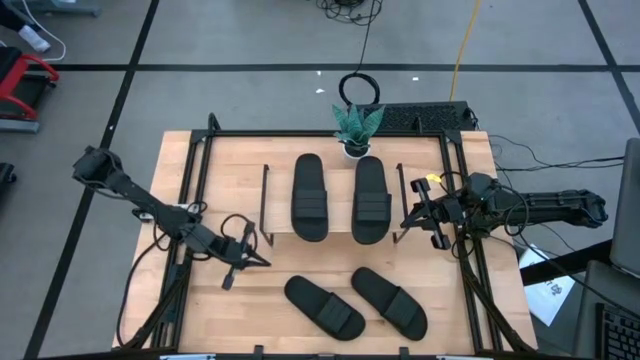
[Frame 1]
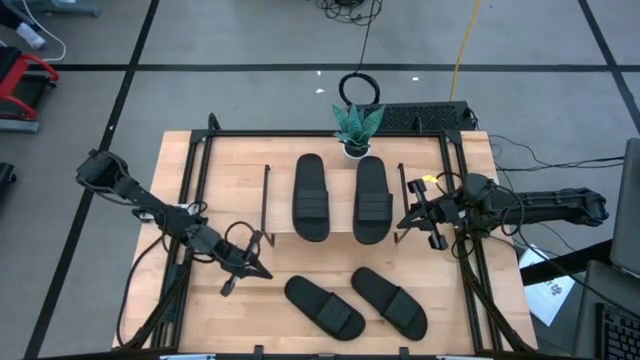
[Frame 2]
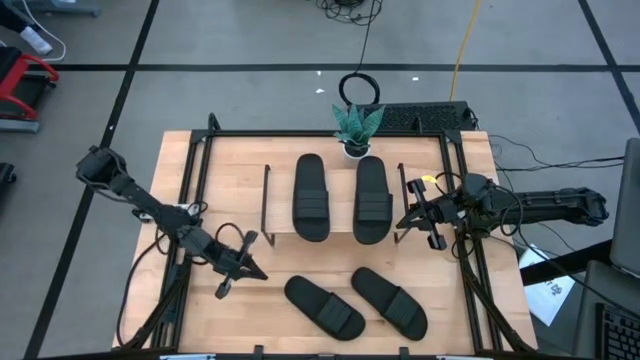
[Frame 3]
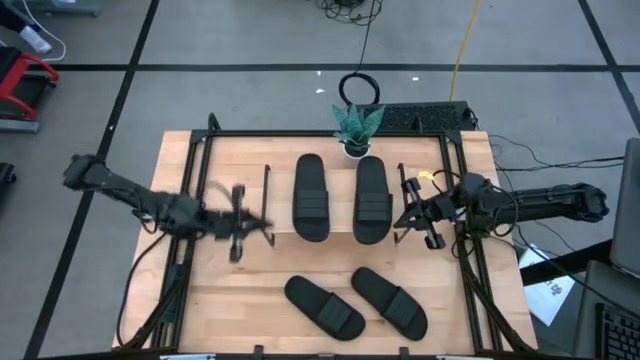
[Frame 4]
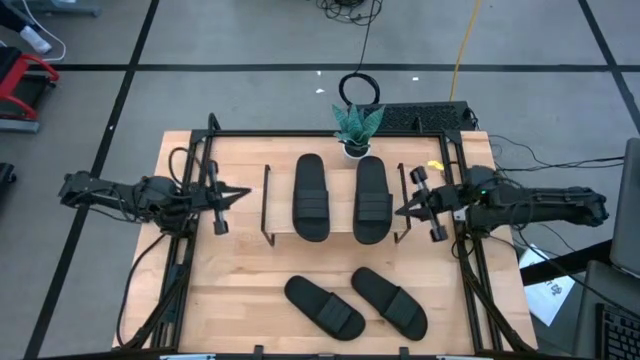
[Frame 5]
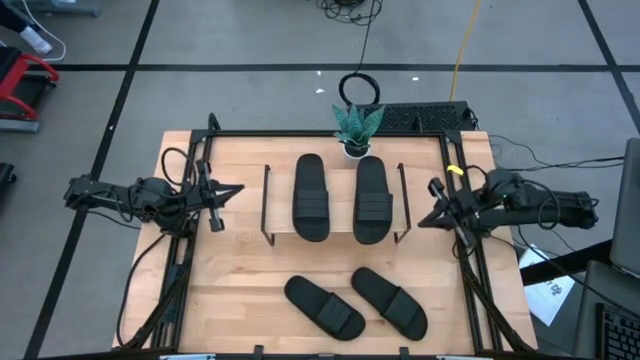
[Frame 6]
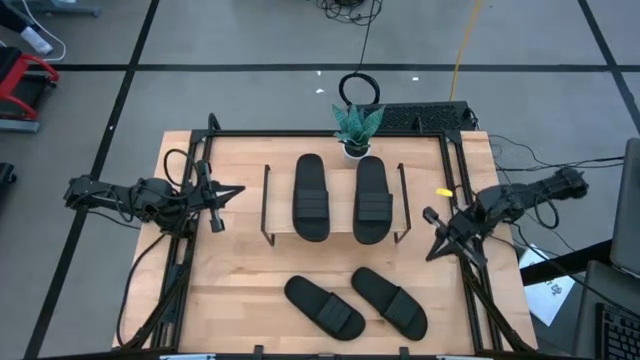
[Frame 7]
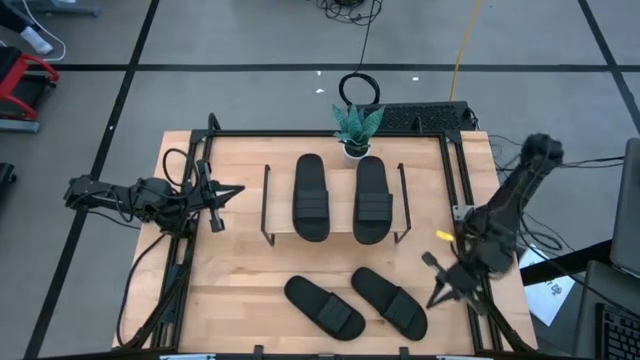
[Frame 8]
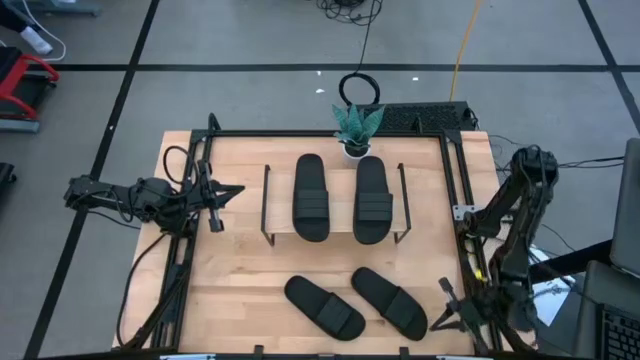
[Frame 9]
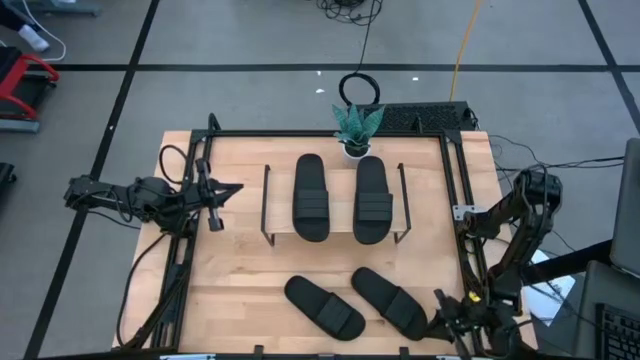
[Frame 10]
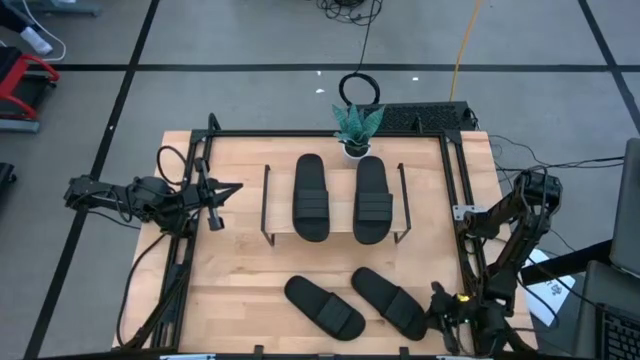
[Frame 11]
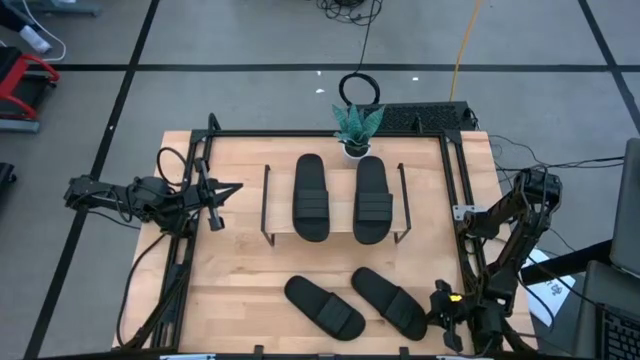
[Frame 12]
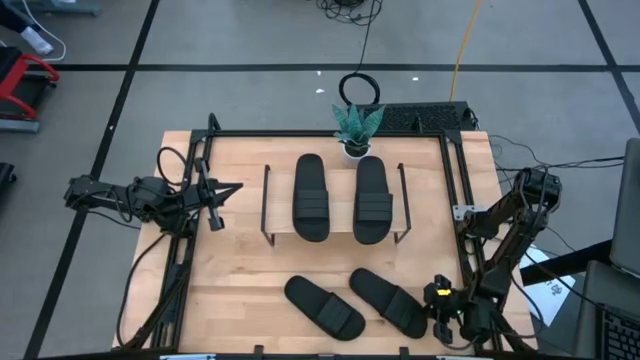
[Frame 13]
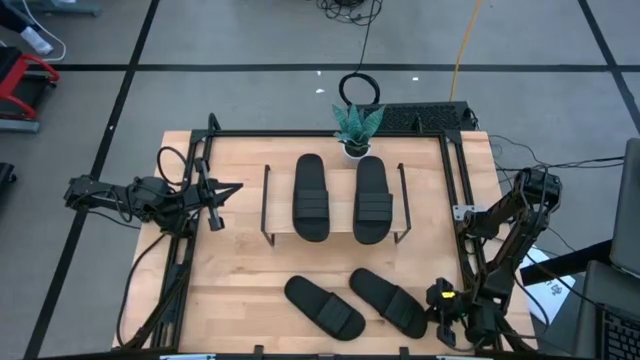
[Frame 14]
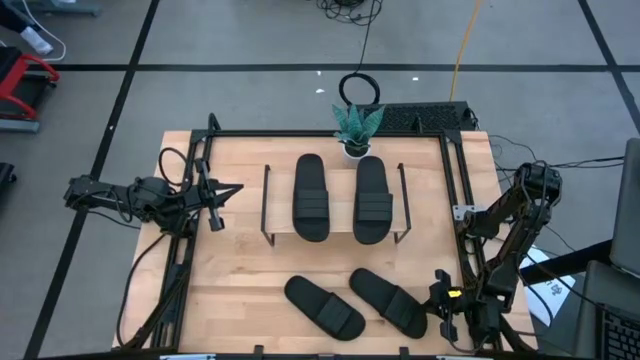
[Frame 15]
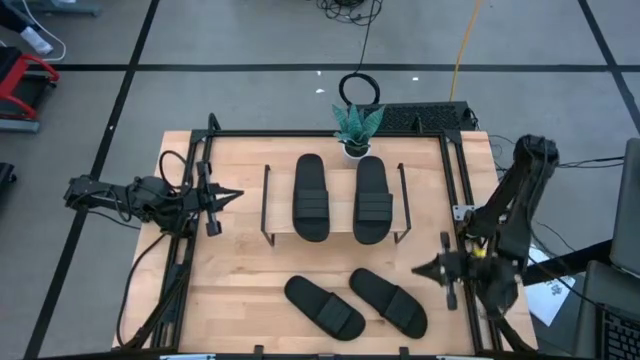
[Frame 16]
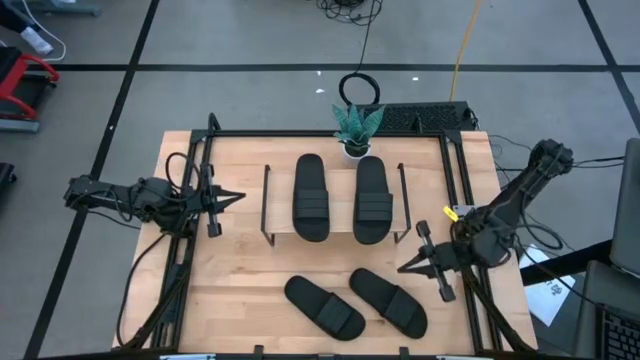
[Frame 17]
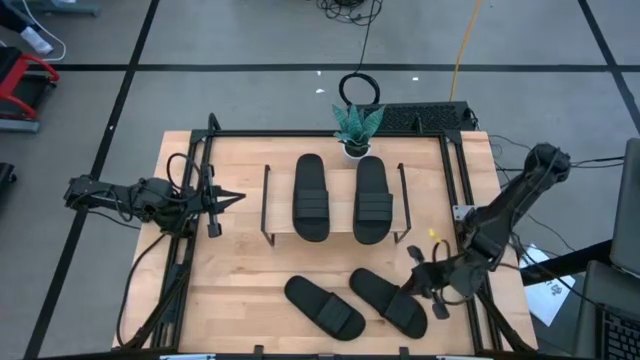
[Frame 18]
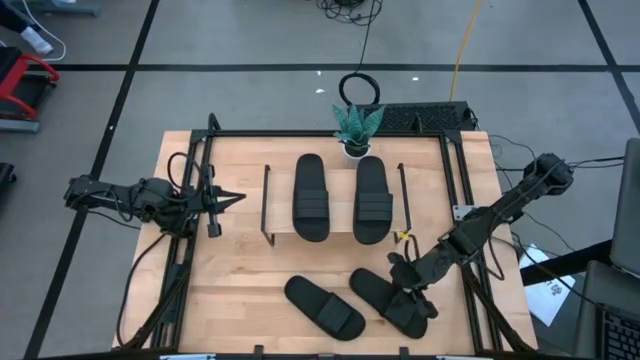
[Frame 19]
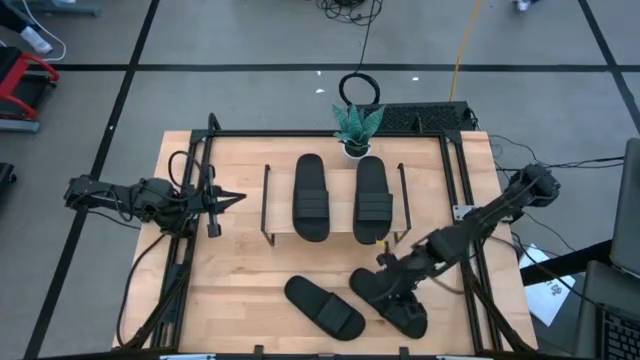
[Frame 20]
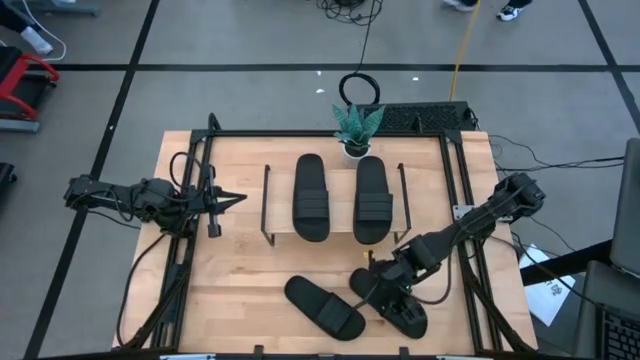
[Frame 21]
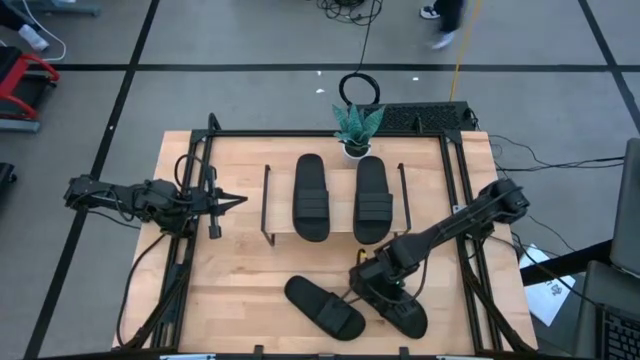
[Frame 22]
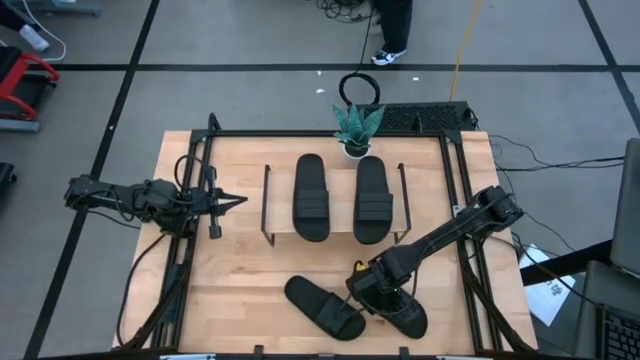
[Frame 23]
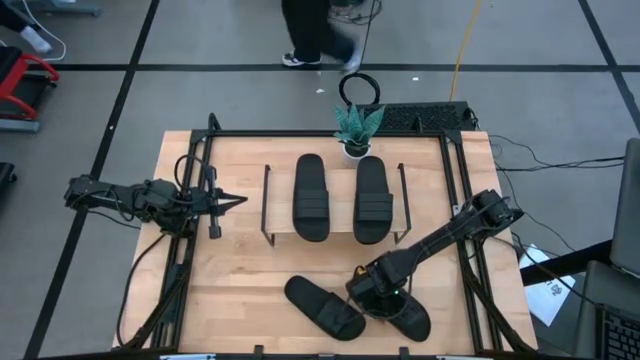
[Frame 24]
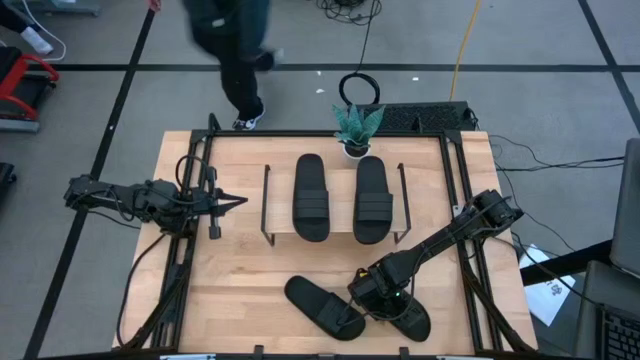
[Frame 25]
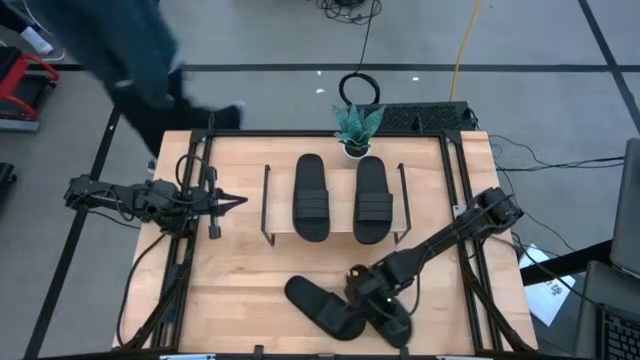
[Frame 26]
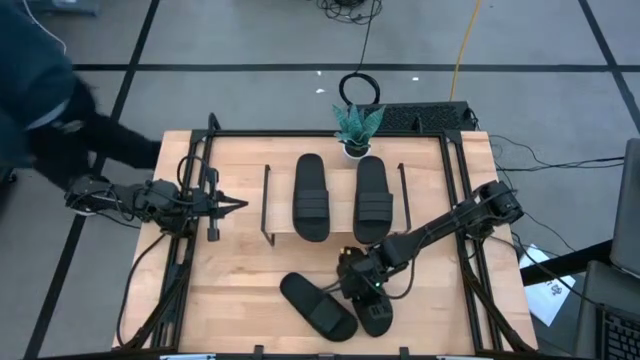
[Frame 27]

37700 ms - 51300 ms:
Task: Pick and place slides into the shelf
Put the black slide under the shelf

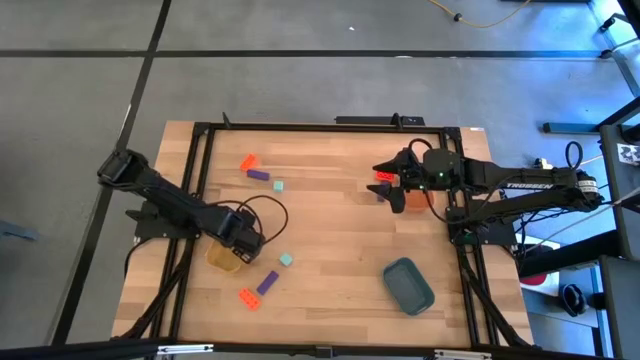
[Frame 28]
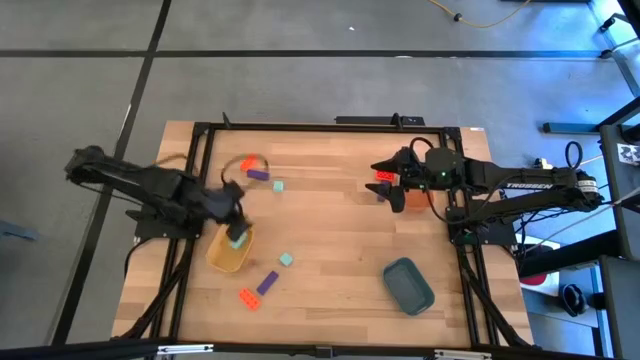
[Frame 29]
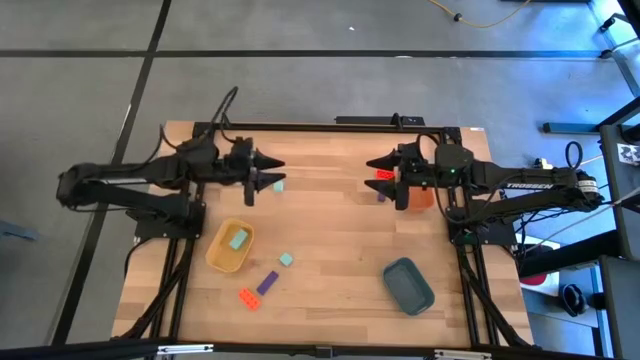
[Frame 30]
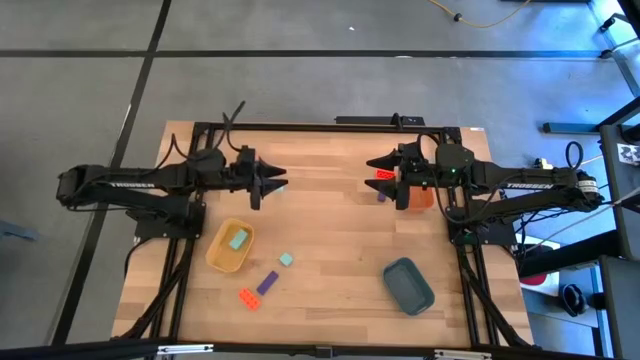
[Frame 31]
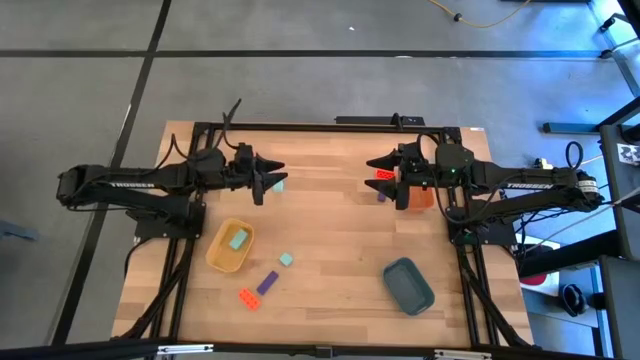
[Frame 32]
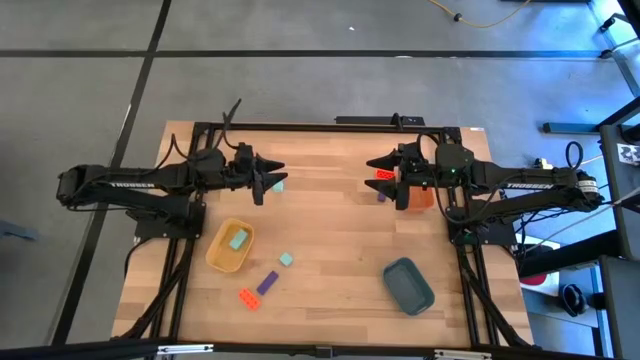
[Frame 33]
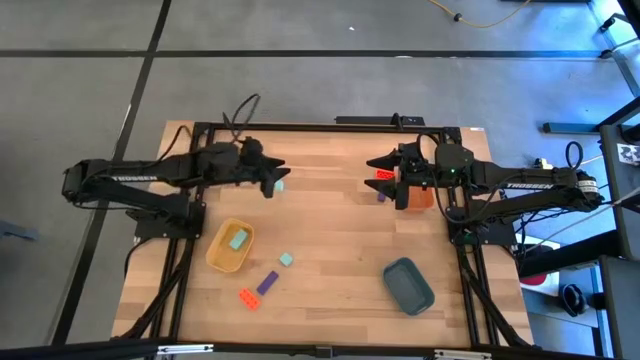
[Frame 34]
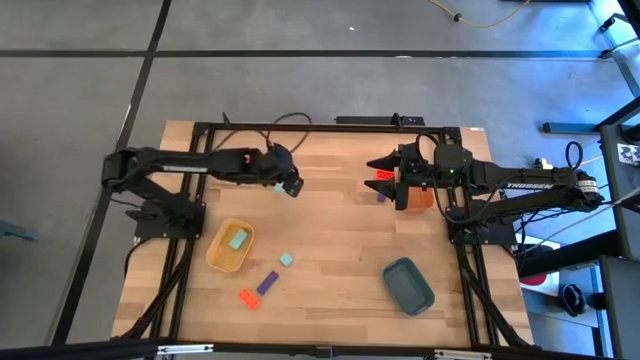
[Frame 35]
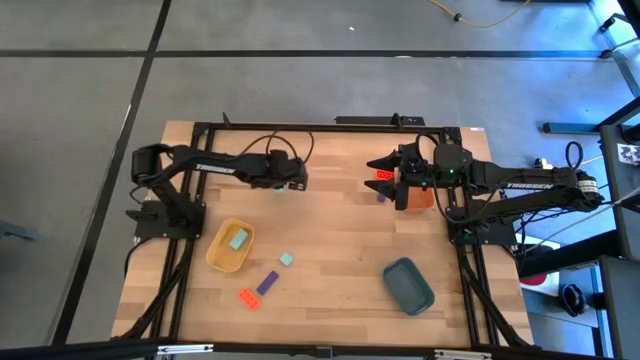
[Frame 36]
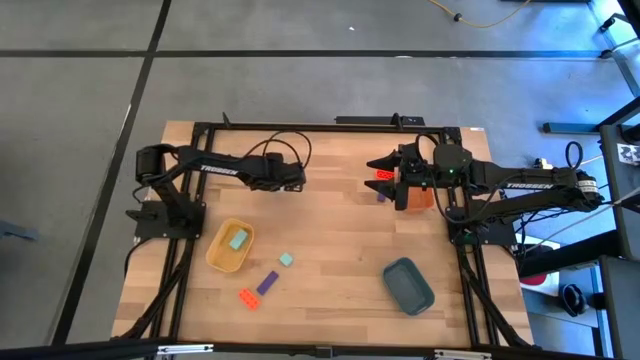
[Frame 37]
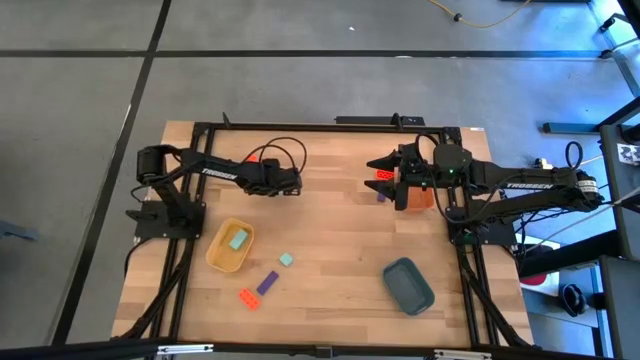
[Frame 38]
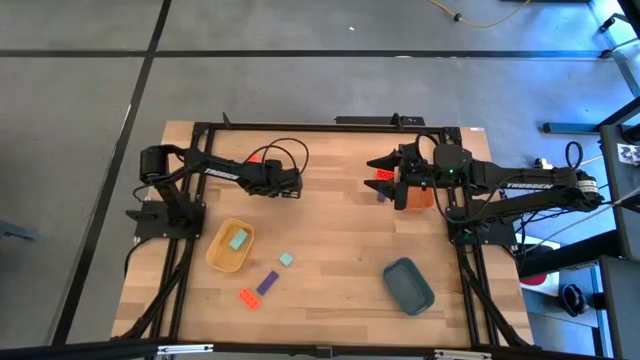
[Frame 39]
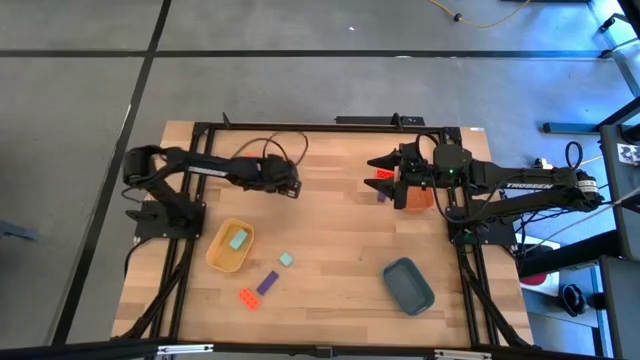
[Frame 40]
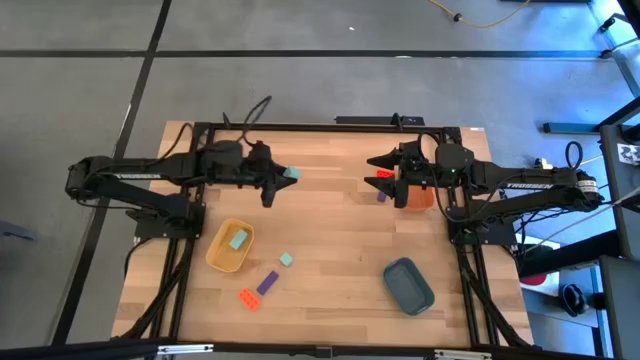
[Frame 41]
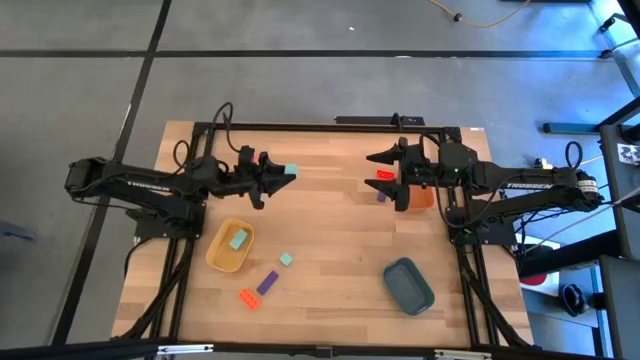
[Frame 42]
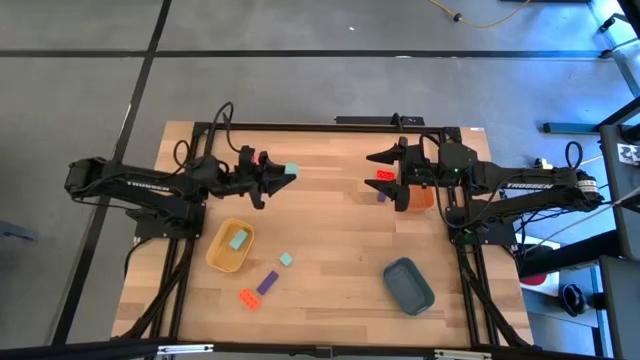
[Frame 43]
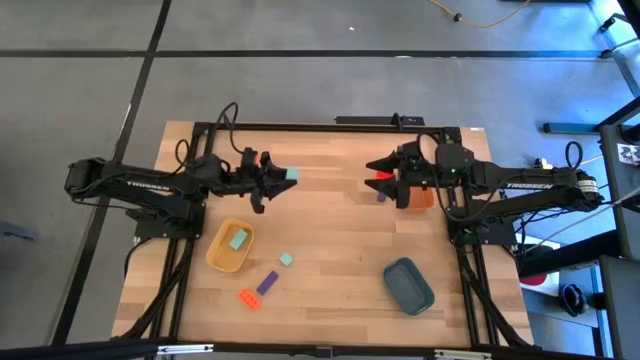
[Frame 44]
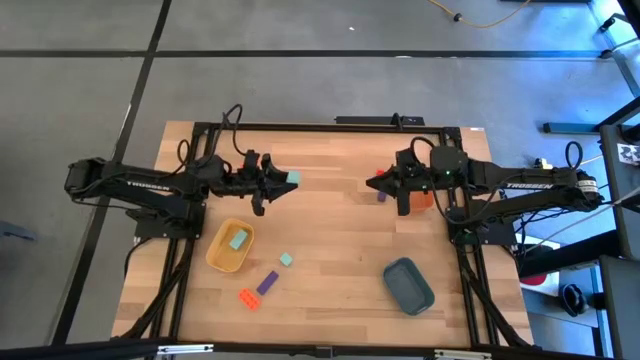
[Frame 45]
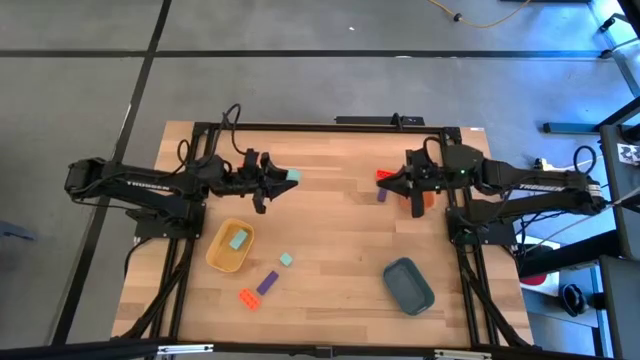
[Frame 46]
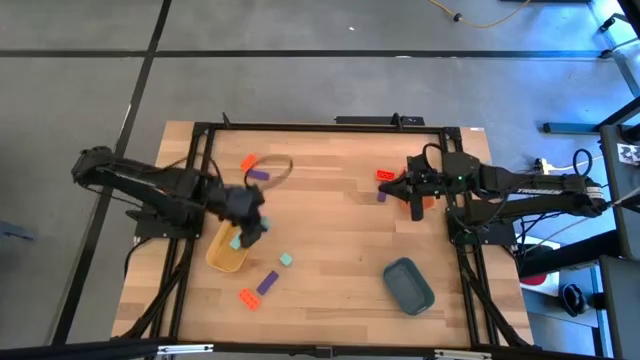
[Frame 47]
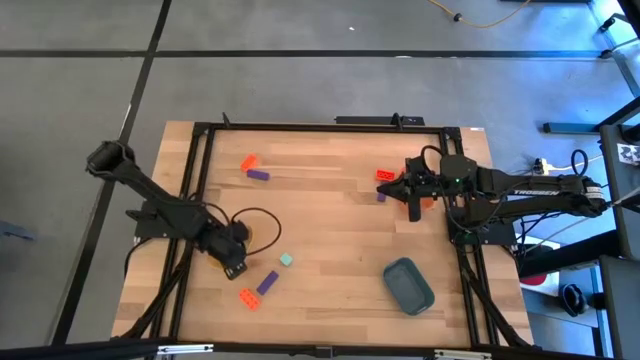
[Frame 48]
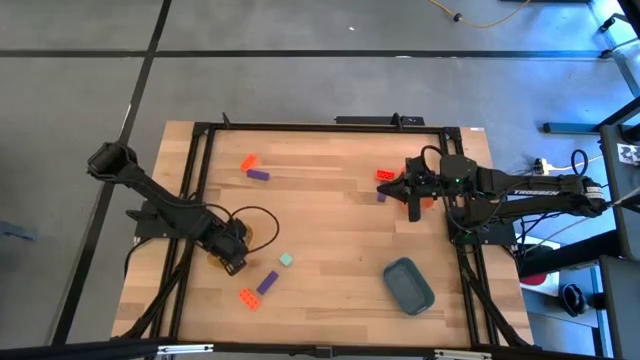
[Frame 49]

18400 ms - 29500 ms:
Task: Sort & place blocks by color
Put the top blue block into the yellow bin
